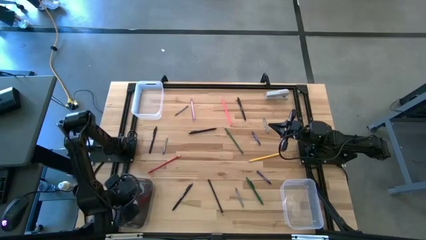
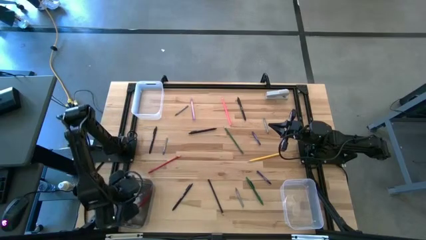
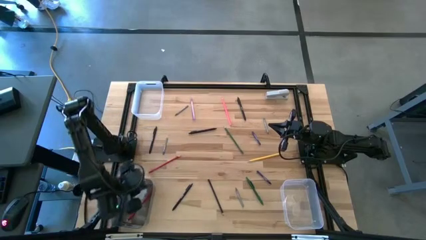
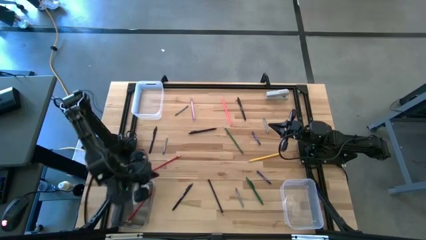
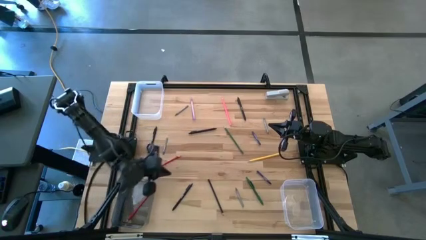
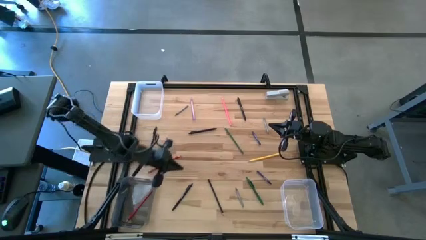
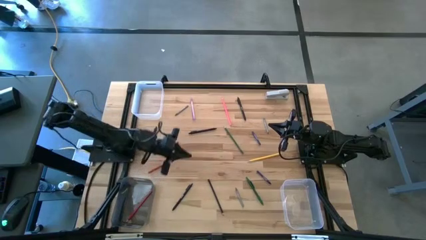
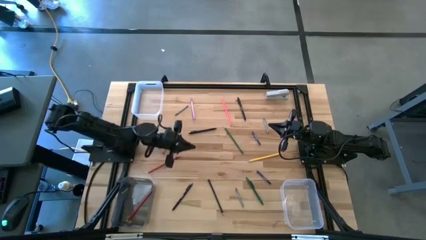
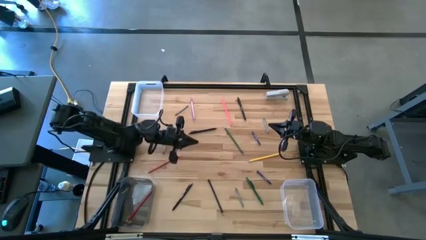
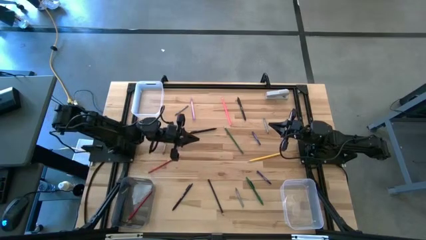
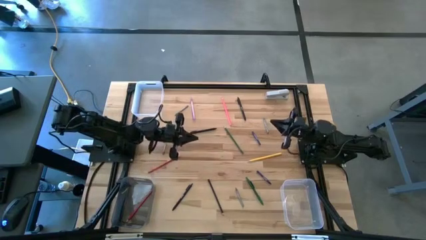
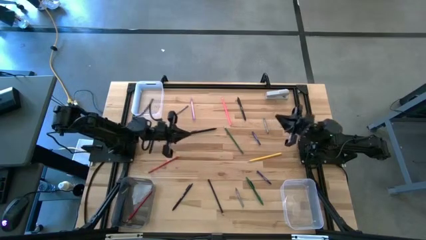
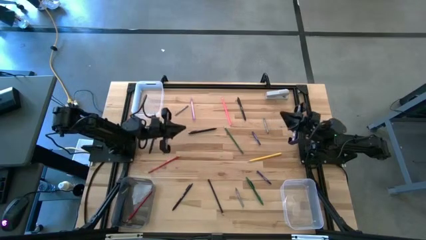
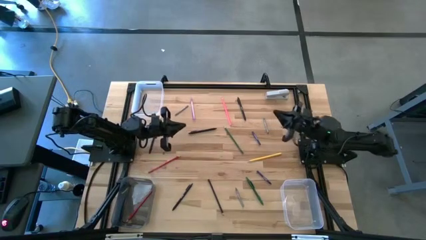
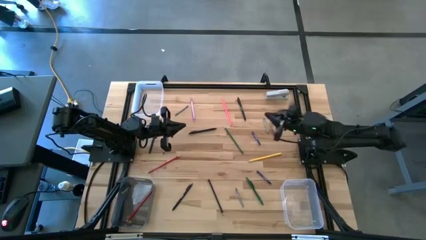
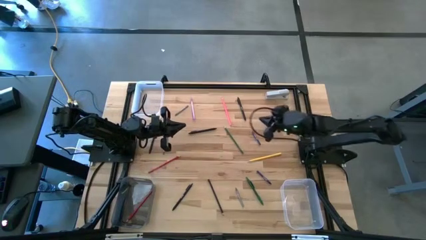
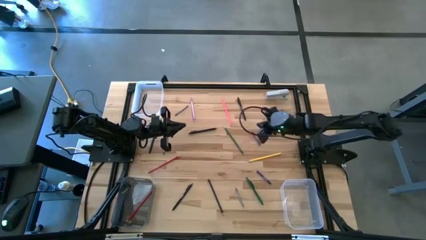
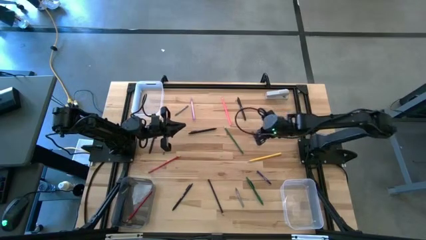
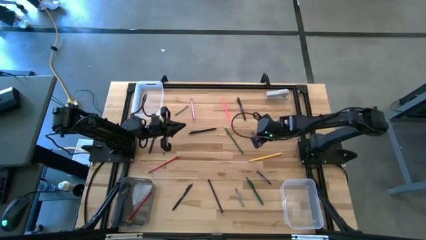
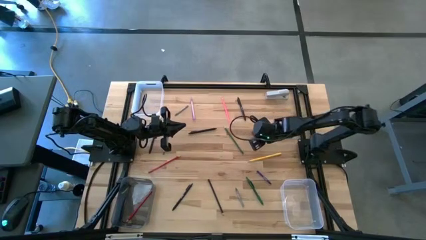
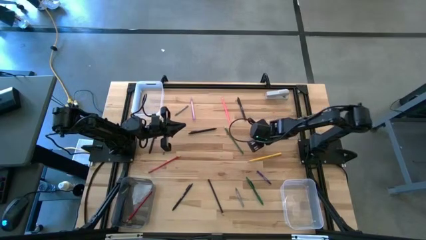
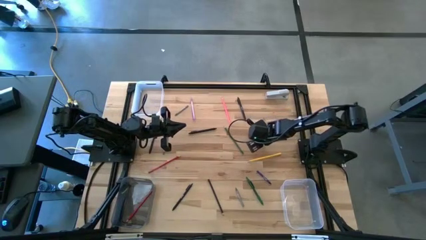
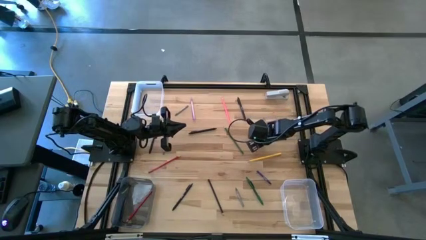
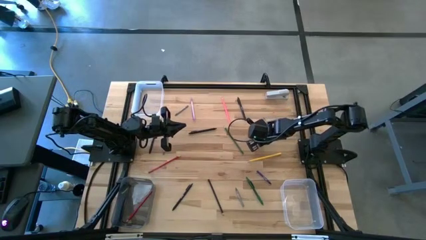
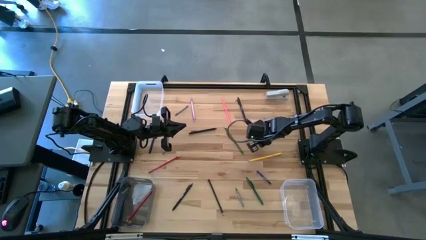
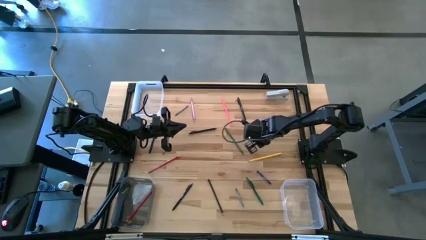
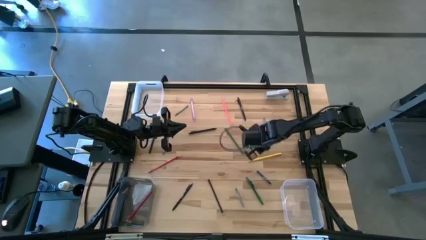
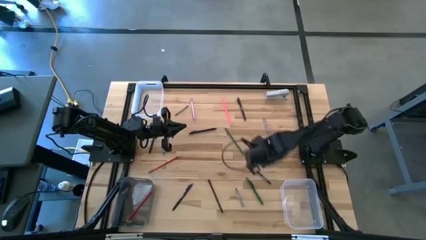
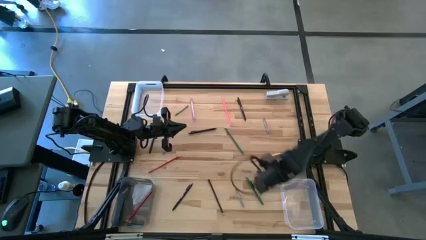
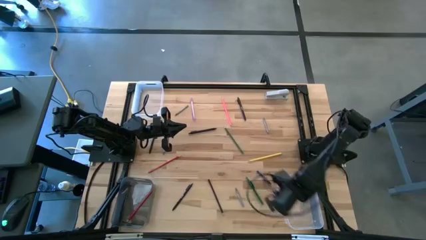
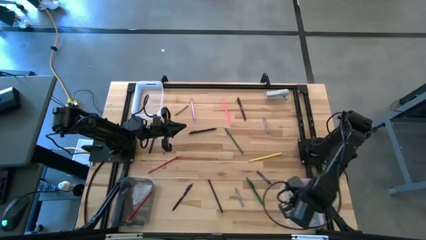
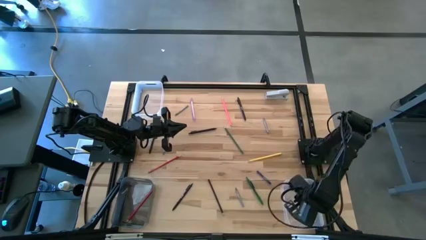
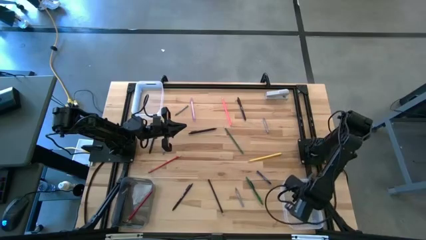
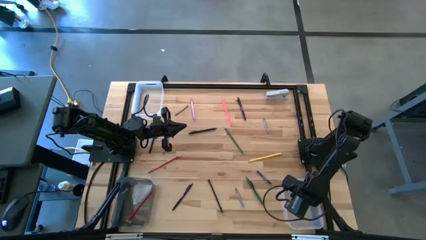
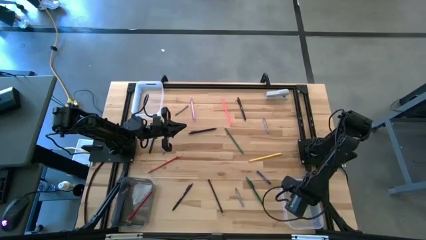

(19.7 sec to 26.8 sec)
Task: Sort crayons/erasers/pens/pencils in bins
Put the top blue crayon into the bottom transparent bin

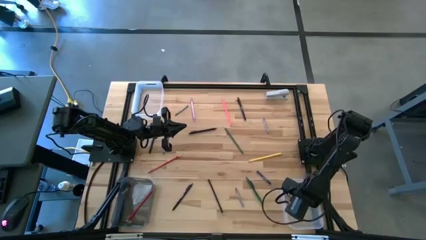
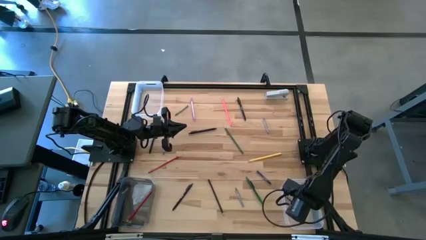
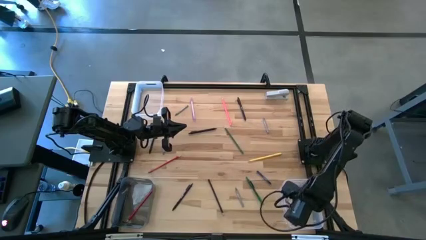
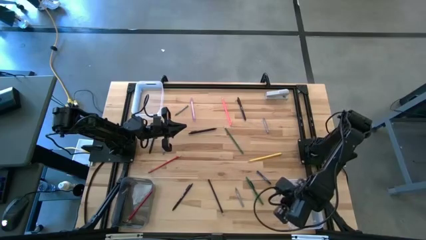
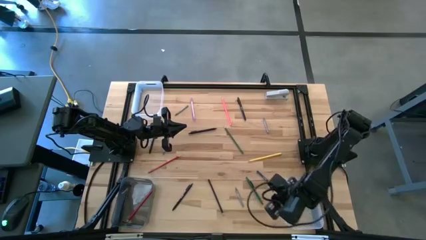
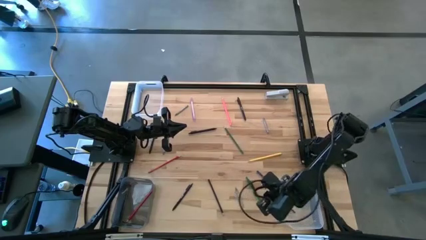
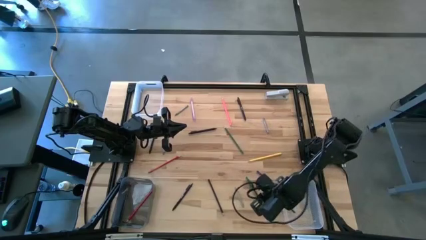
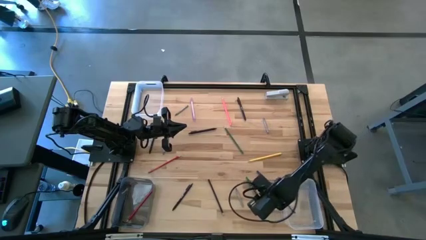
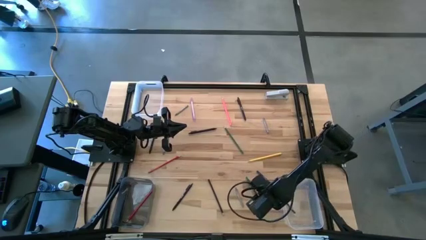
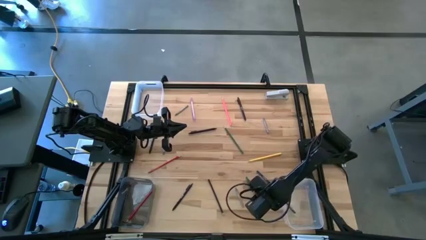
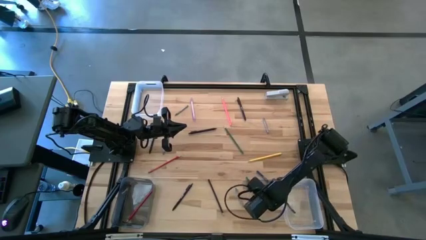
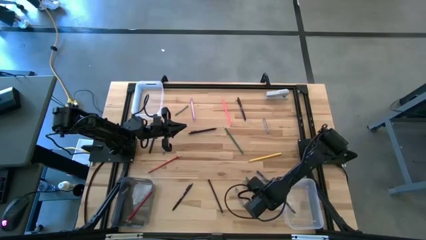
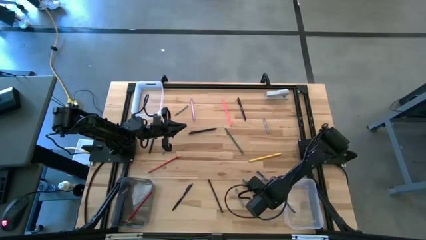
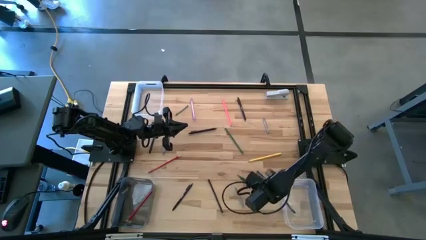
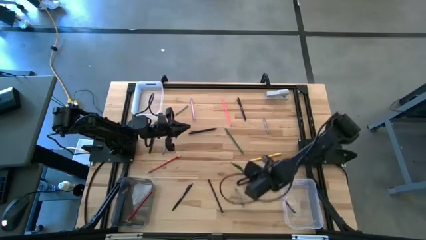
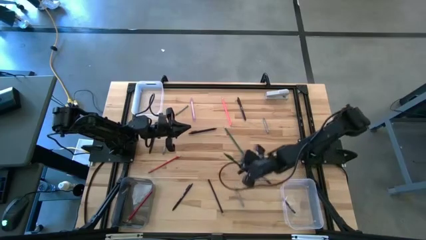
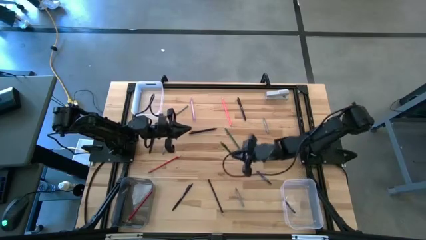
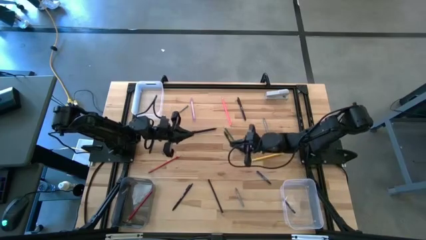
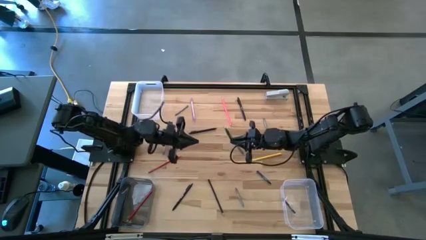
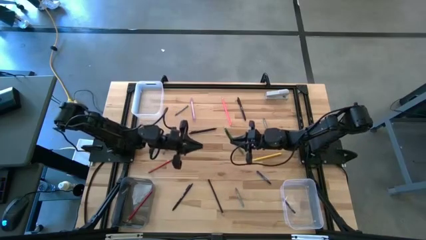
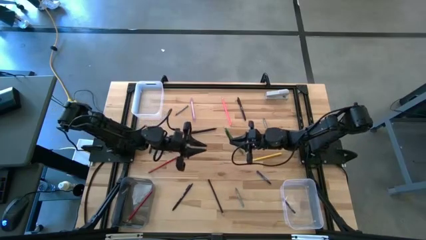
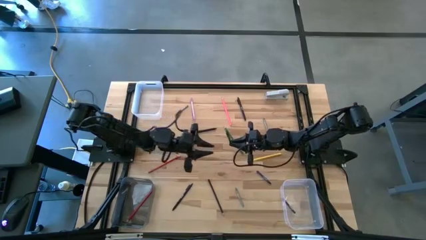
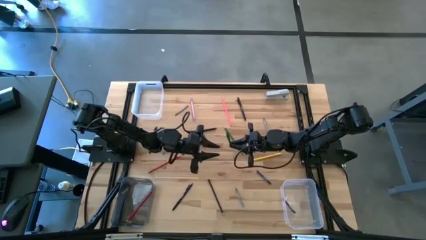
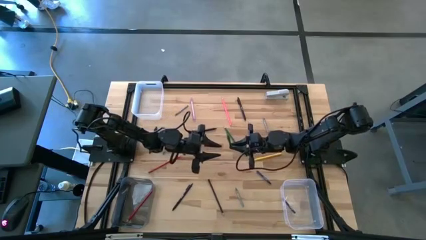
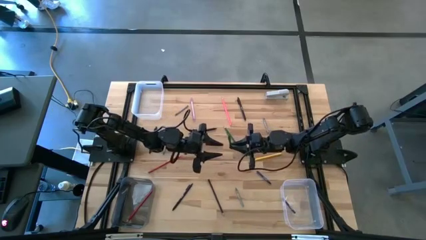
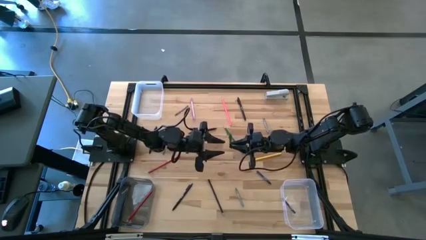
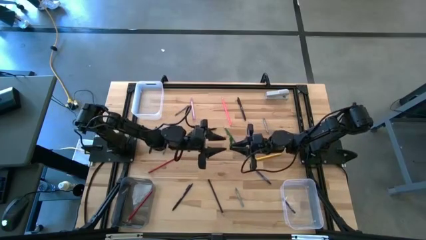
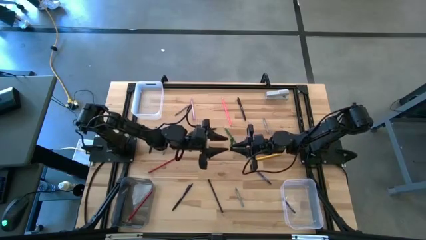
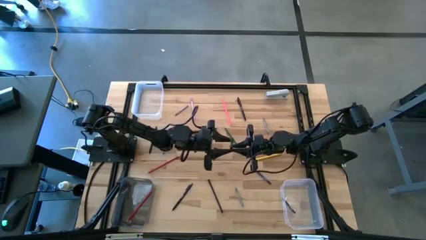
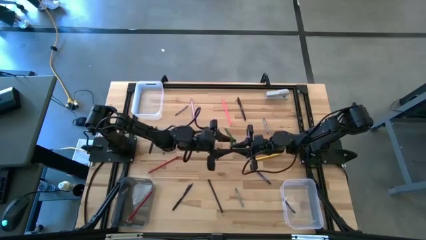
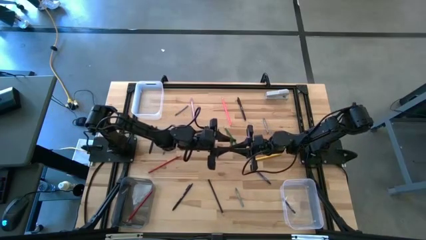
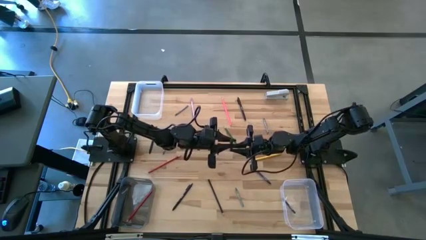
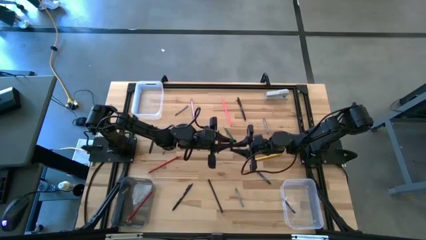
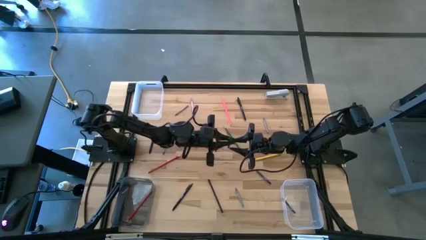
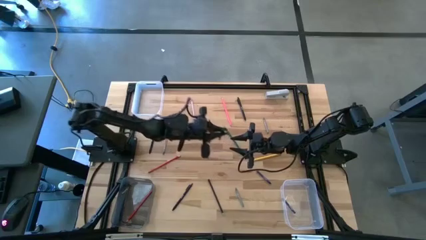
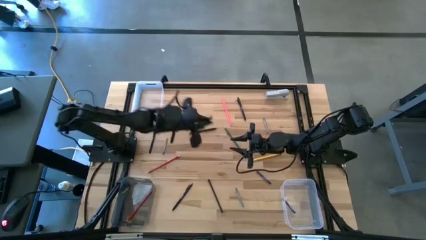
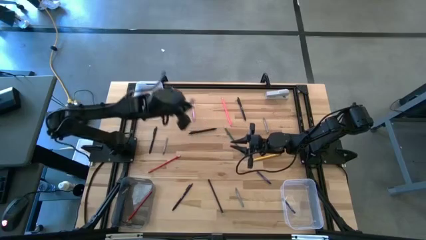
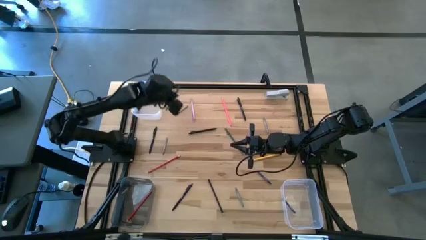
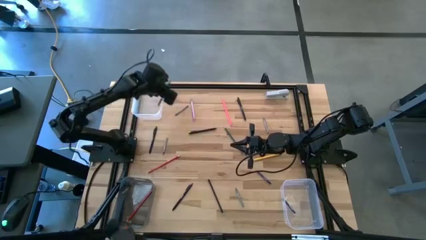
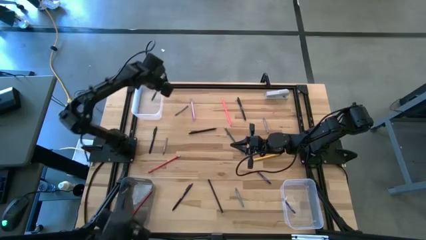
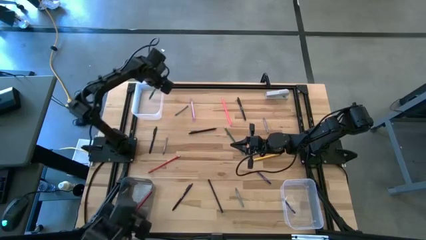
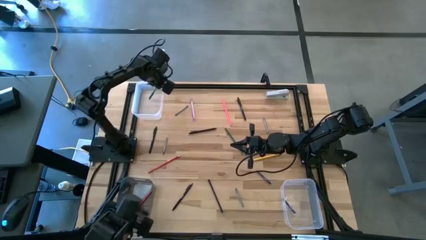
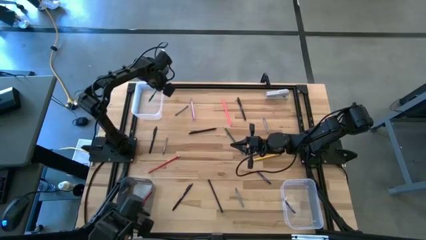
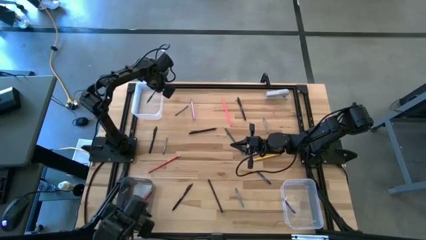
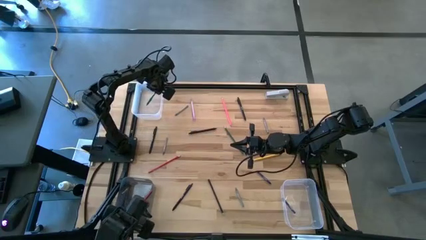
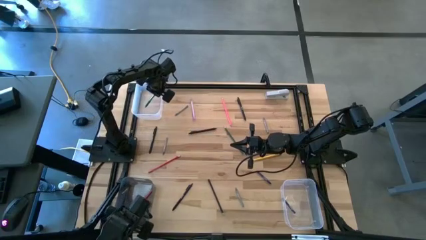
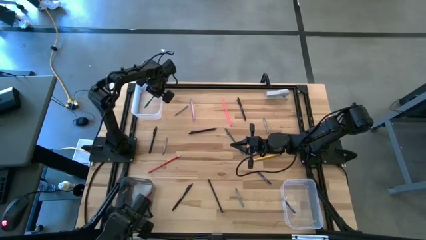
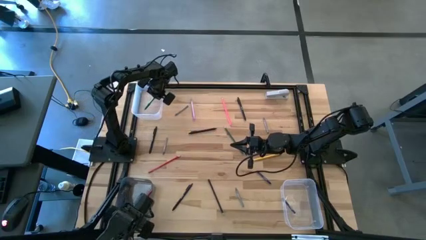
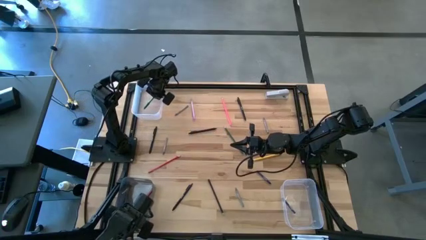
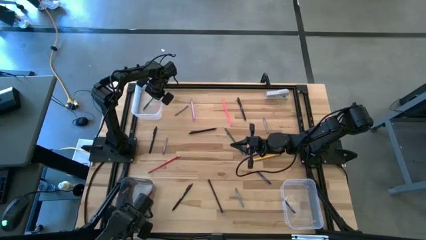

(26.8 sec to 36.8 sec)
Put the green pen into the top transparent bin
